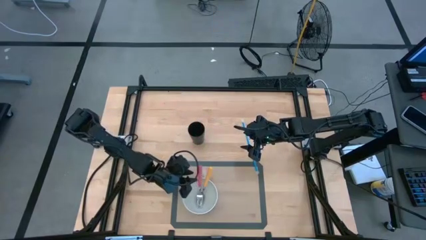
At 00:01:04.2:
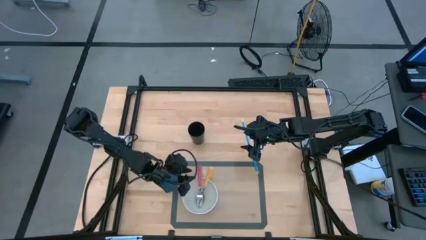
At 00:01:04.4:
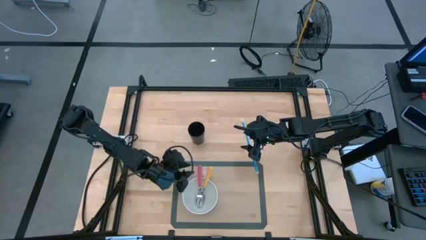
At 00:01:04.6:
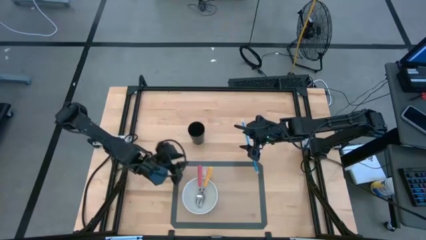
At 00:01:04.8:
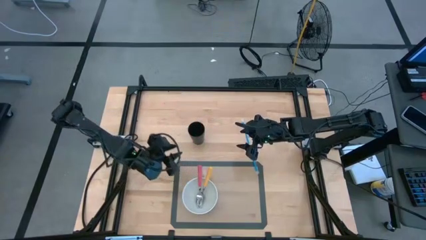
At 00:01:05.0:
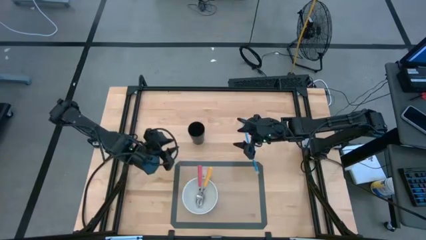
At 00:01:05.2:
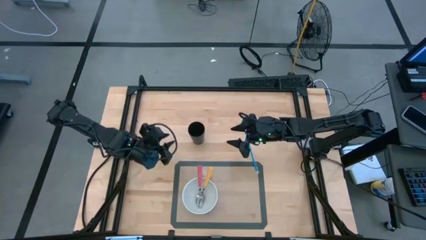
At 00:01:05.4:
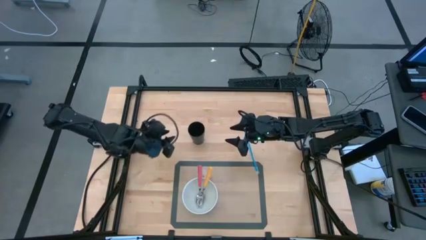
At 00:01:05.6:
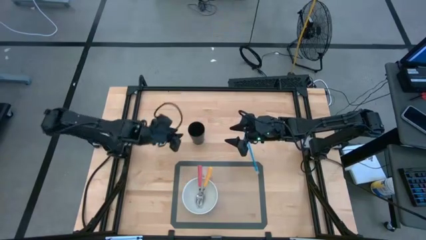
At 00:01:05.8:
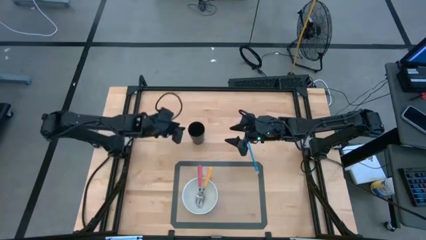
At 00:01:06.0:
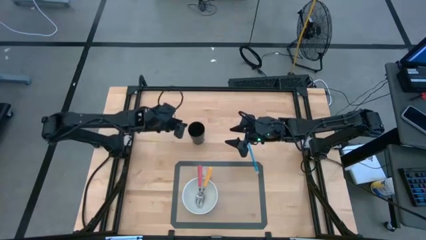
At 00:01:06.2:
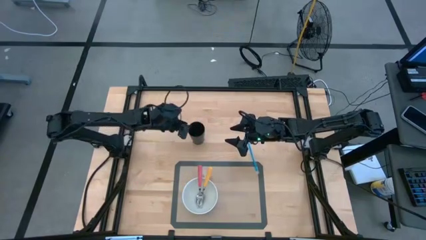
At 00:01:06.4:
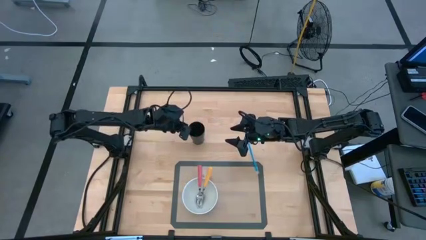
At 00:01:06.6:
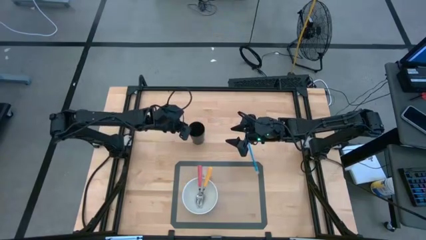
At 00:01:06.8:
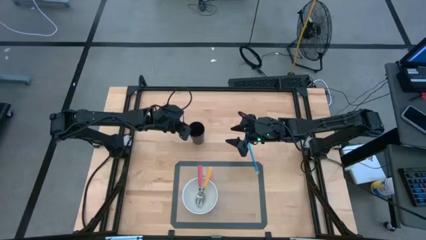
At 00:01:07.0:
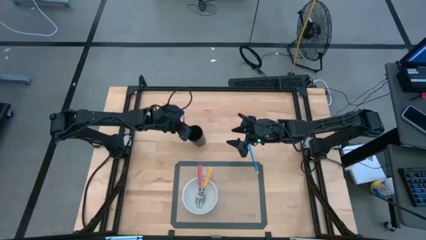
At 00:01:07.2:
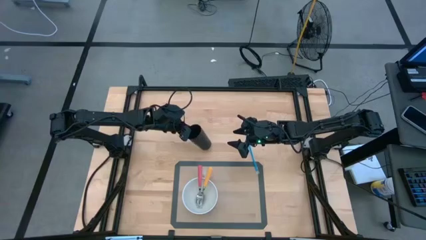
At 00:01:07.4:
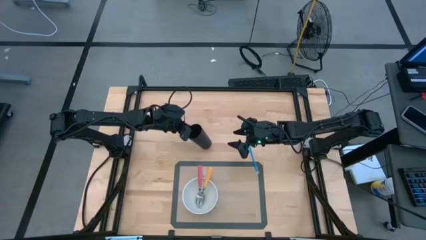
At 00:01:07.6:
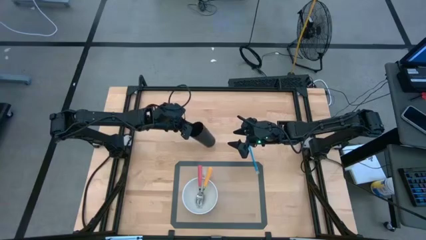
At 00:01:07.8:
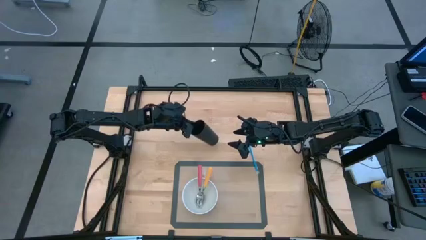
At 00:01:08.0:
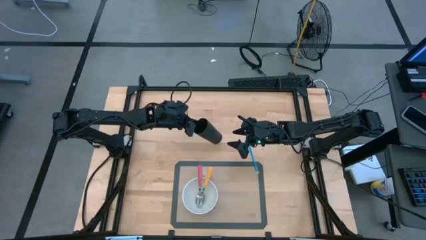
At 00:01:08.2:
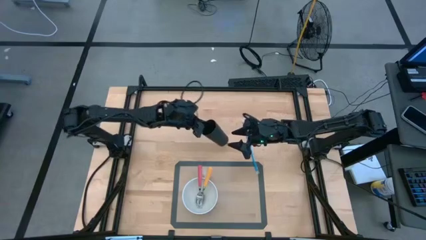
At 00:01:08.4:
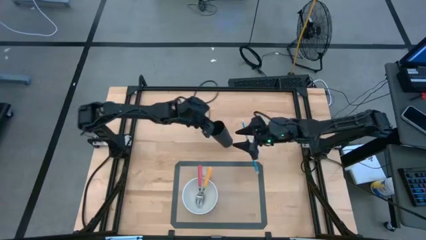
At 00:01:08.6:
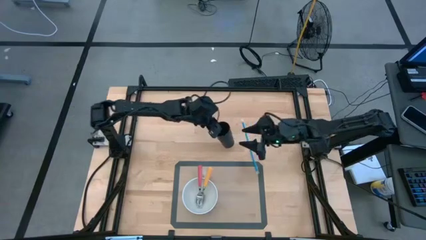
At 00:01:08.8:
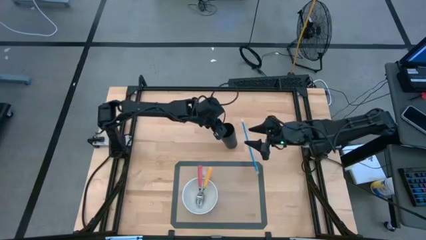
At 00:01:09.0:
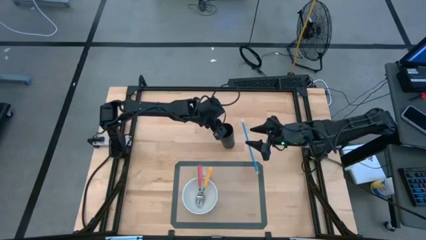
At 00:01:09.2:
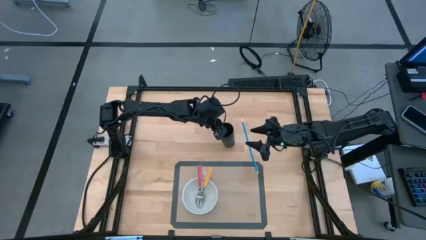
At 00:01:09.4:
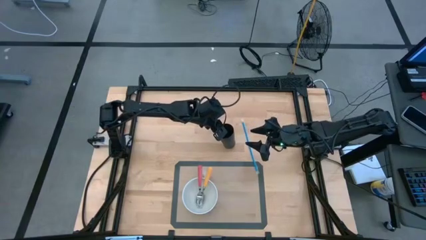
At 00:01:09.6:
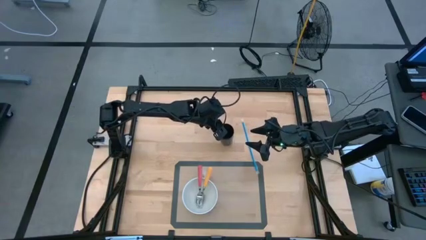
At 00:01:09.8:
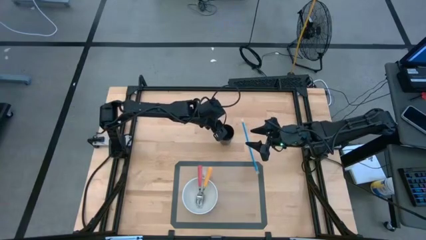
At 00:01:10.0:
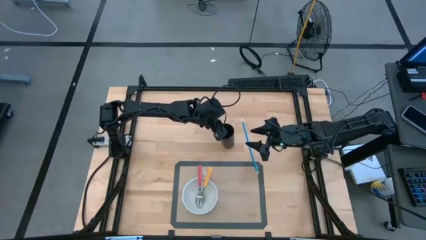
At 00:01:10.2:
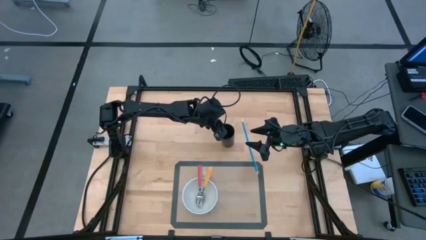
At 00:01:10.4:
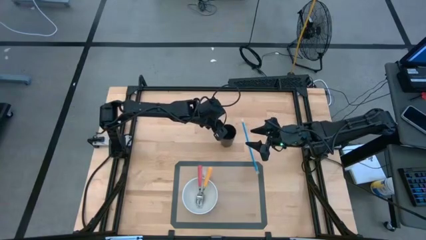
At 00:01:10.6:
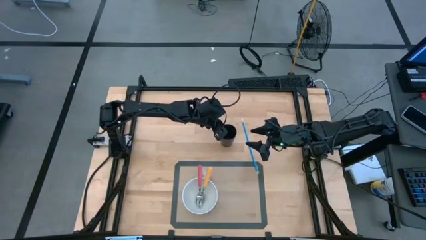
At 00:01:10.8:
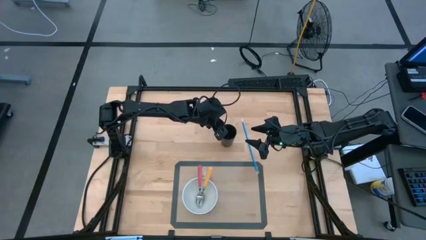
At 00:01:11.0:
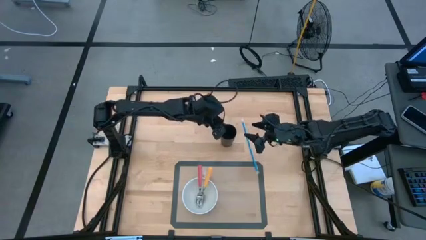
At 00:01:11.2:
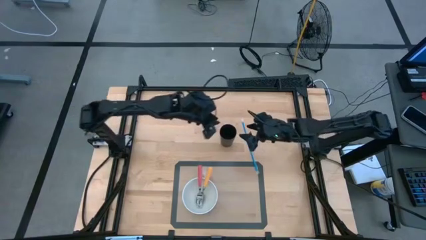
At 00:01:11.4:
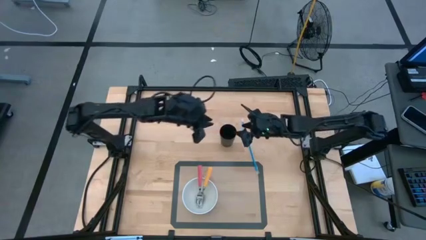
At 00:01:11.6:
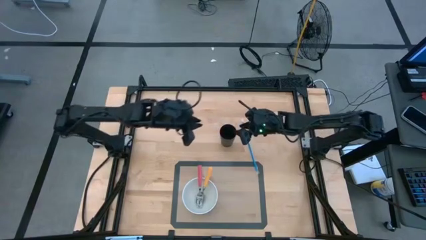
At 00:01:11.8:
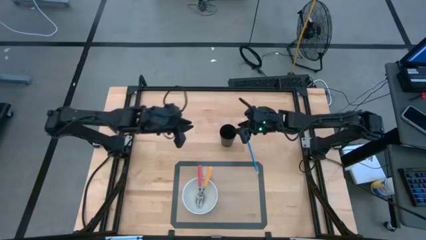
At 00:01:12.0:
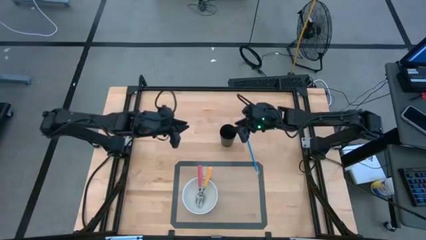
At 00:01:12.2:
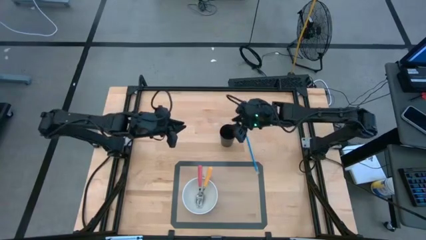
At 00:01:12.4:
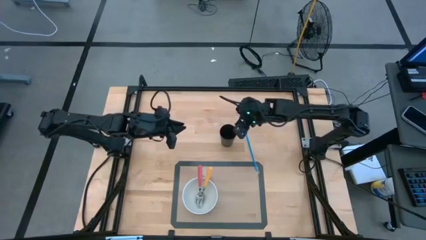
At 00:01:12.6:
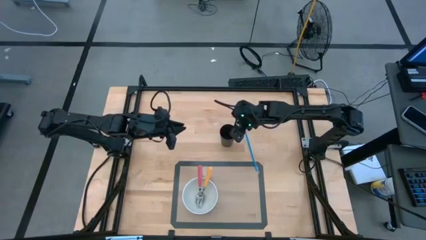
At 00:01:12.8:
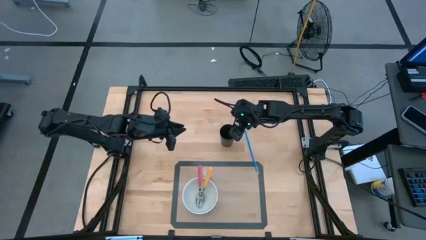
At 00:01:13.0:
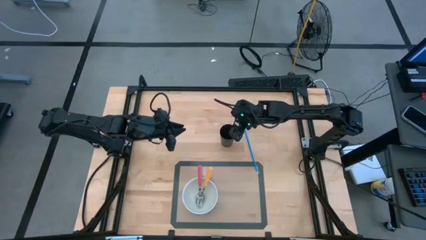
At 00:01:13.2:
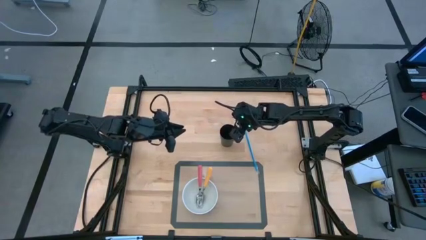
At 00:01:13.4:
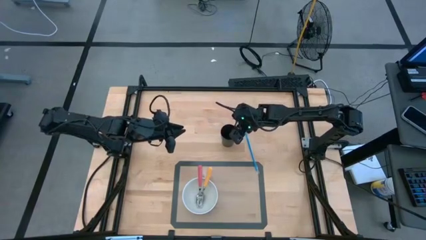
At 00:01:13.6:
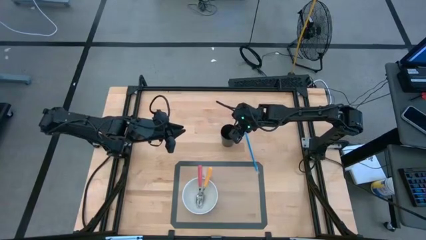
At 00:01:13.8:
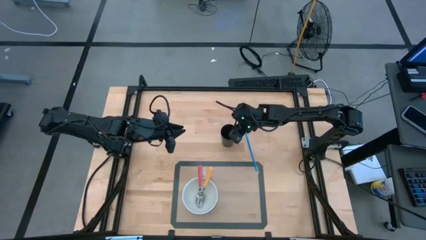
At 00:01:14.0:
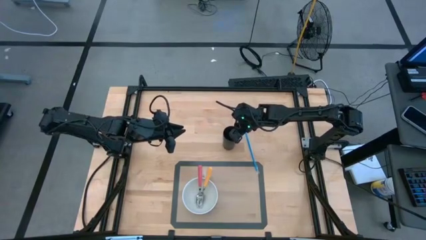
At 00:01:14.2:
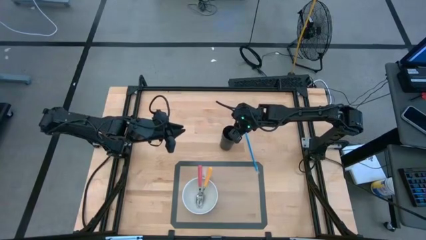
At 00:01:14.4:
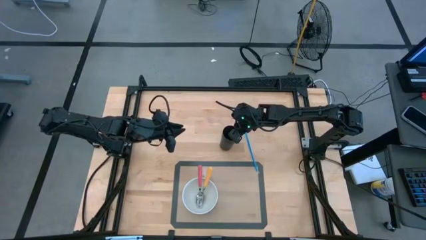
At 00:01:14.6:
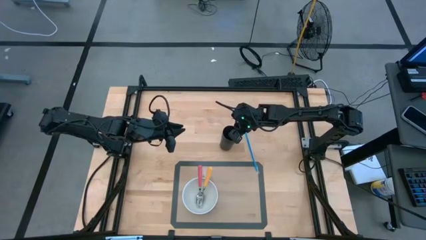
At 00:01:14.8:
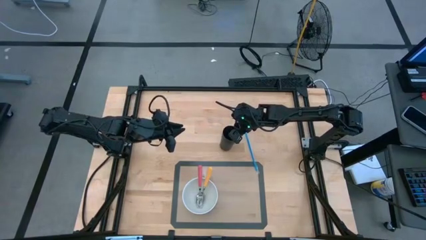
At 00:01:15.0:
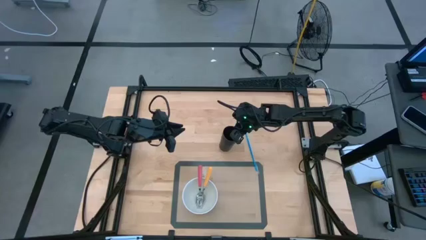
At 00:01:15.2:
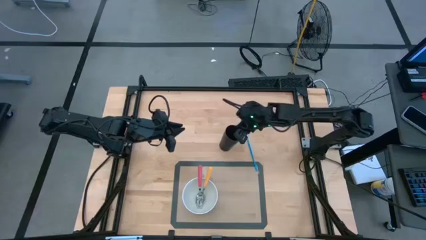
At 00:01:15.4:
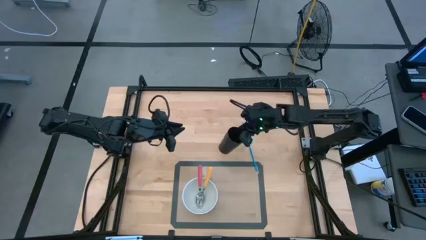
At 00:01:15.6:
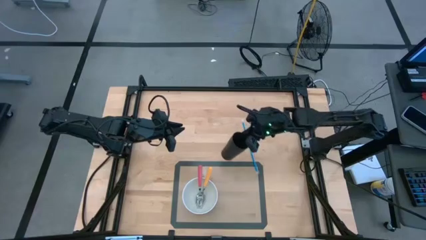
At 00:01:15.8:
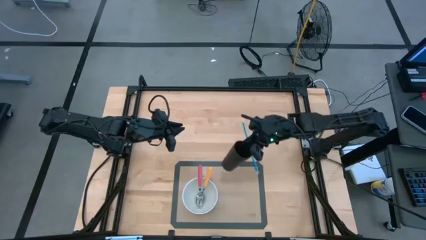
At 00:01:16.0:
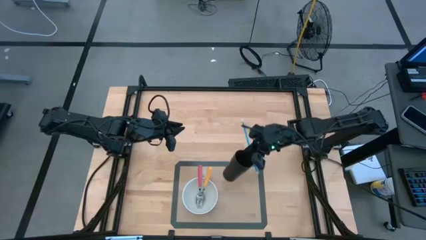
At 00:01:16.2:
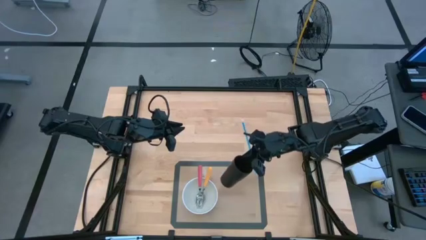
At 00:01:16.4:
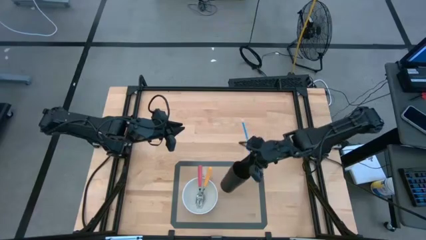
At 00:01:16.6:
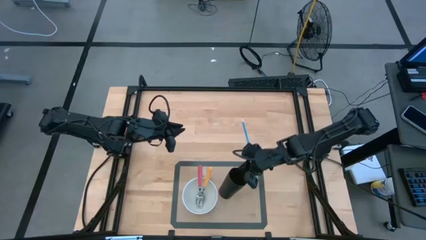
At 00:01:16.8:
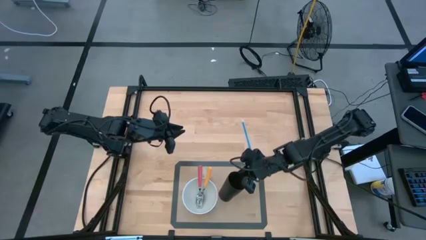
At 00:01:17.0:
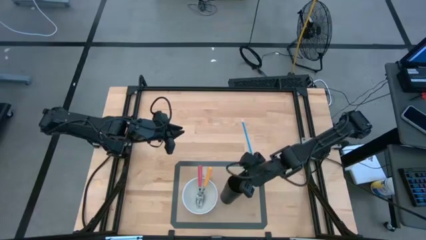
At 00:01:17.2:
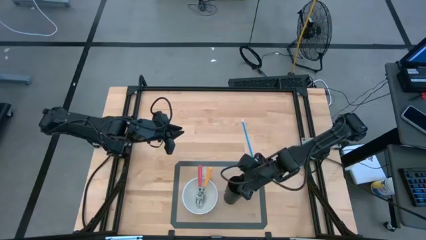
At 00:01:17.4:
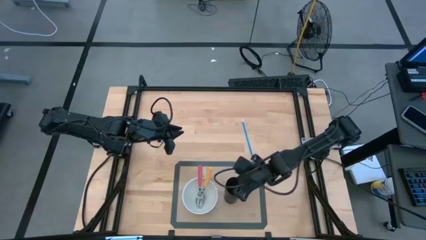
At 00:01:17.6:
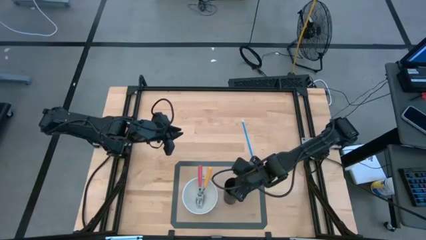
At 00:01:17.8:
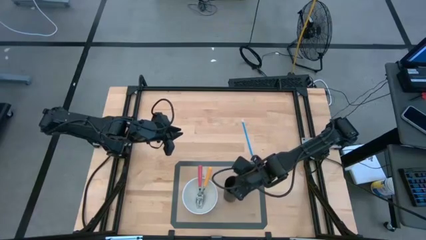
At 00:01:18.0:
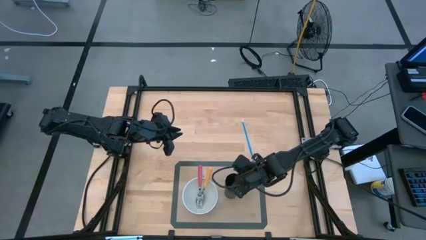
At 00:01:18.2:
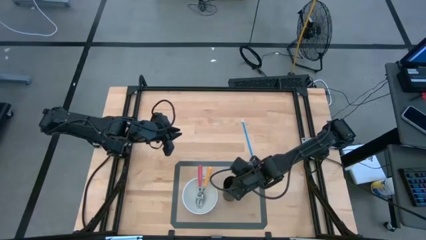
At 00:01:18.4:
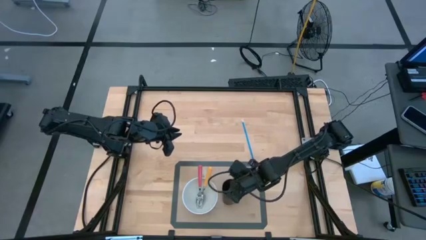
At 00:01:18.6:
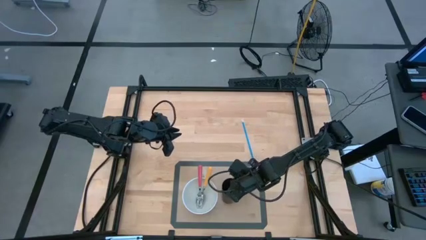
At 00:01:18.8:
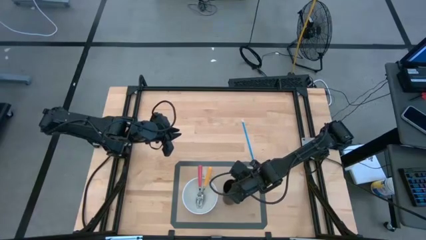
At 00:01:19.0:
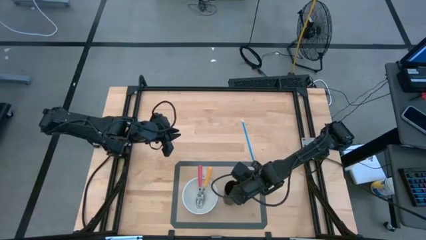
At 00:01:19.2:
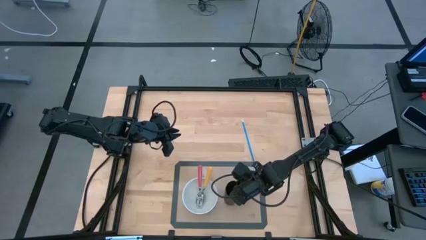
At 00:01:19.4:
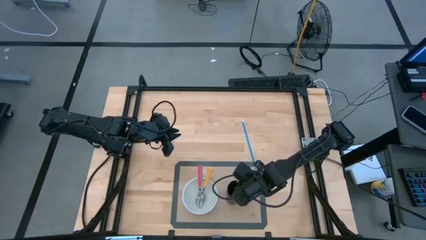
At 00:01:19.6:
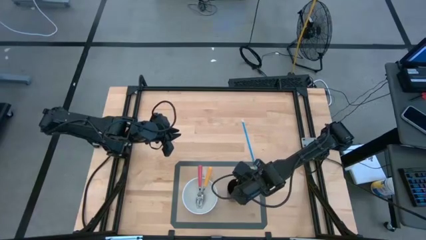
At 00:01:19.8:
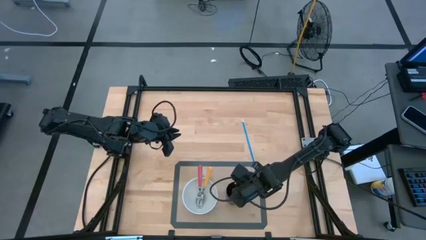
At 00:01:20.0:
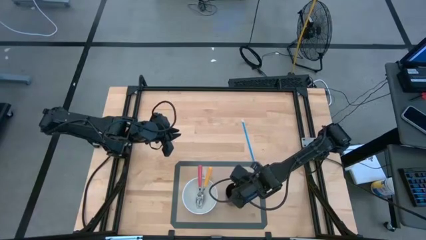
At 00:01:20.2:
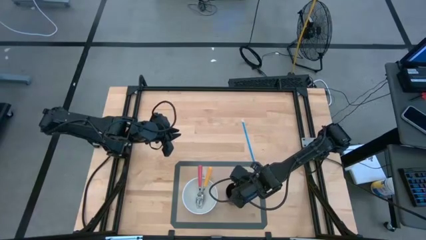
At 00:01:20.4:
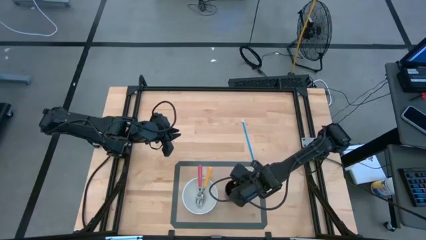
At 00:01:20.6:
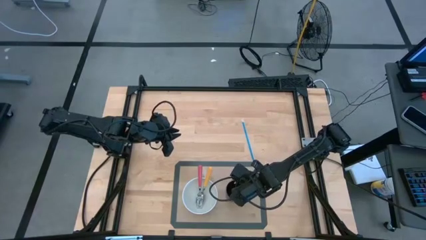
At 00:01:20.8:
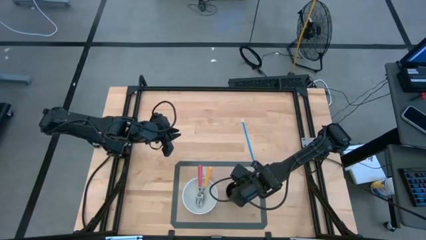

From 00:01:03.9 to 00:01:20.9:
Task: Pick & Place Utensil
Put the black cup to the right of the white bowl on the mat
